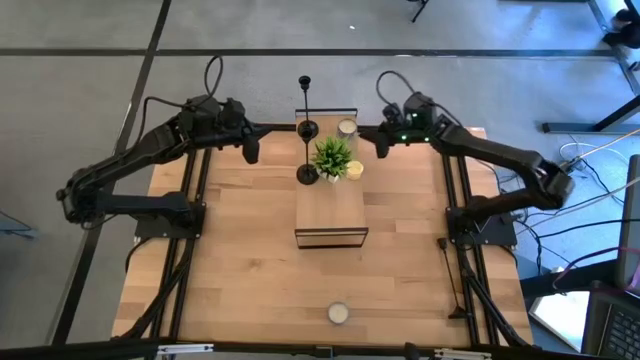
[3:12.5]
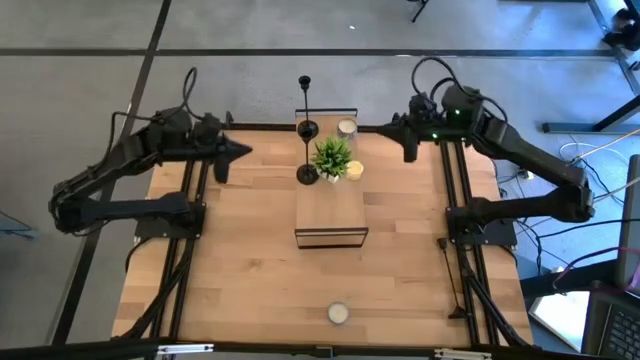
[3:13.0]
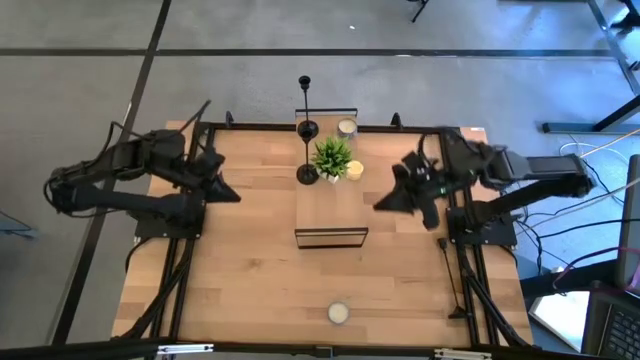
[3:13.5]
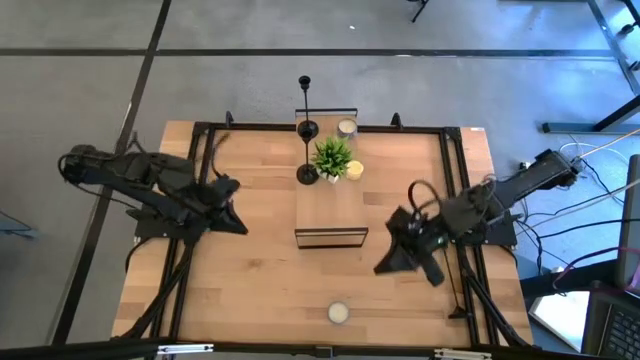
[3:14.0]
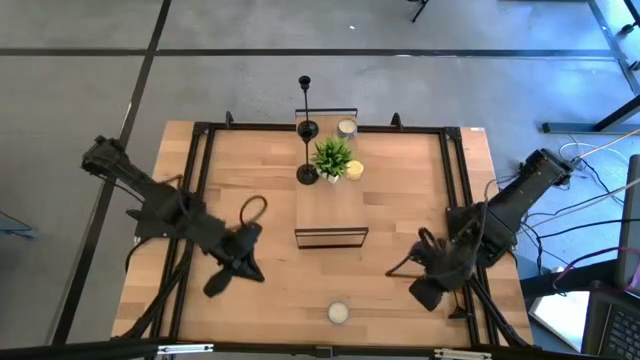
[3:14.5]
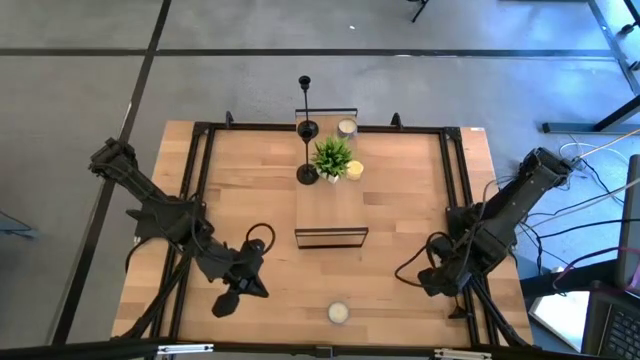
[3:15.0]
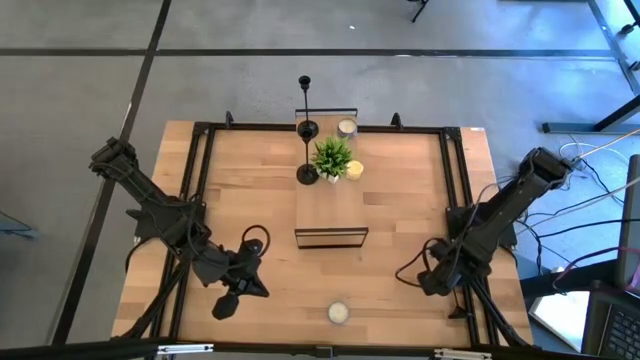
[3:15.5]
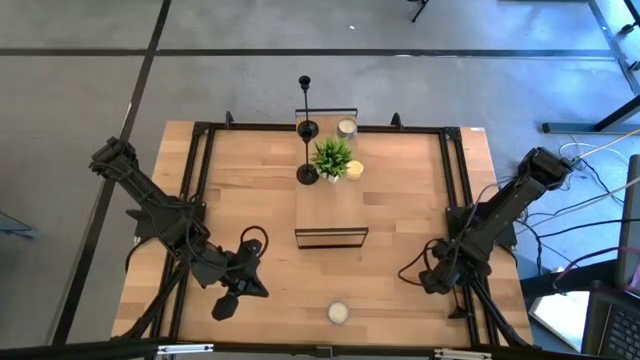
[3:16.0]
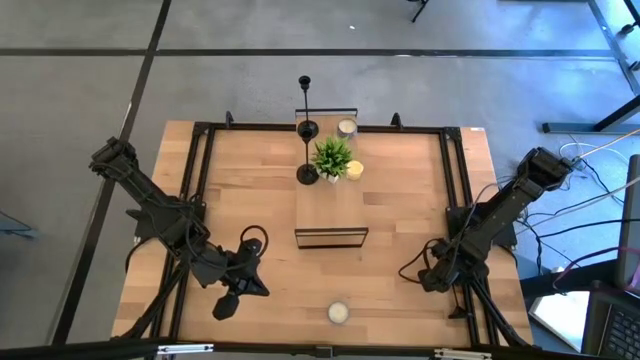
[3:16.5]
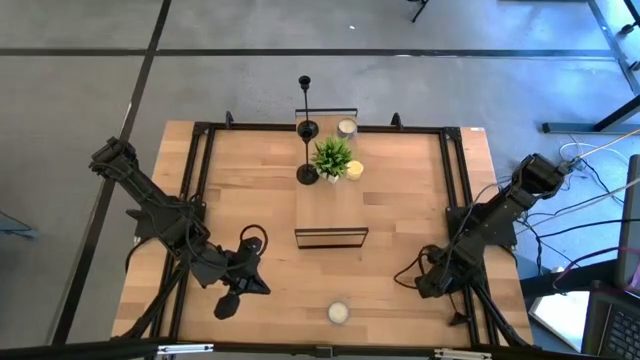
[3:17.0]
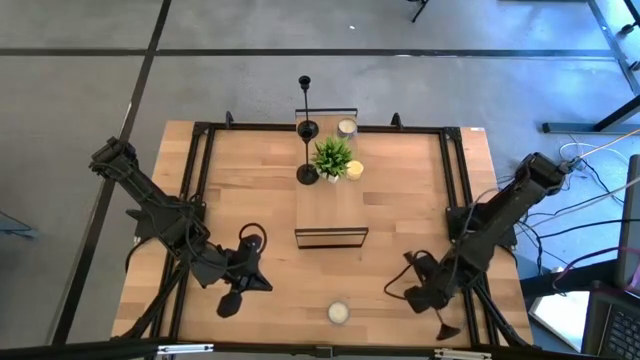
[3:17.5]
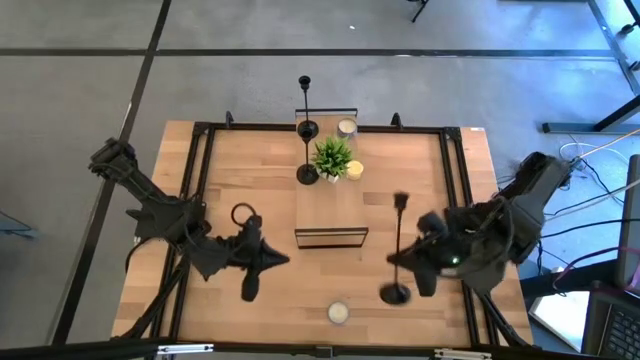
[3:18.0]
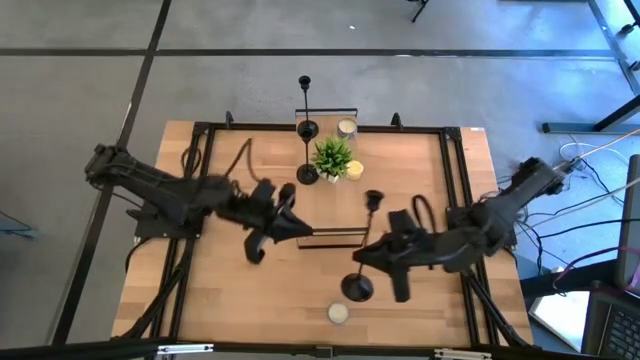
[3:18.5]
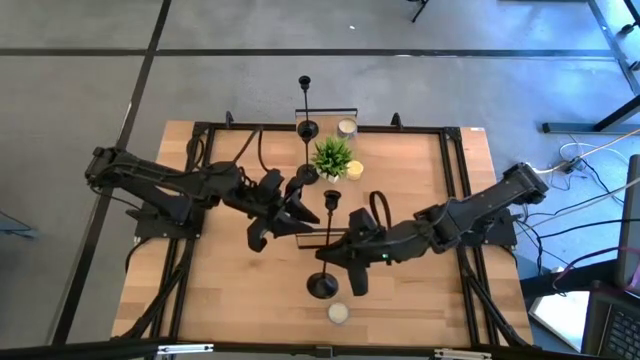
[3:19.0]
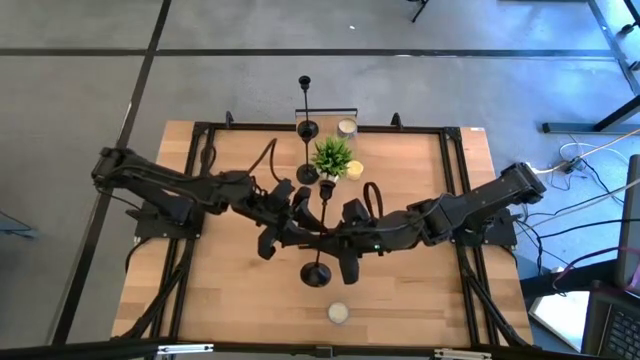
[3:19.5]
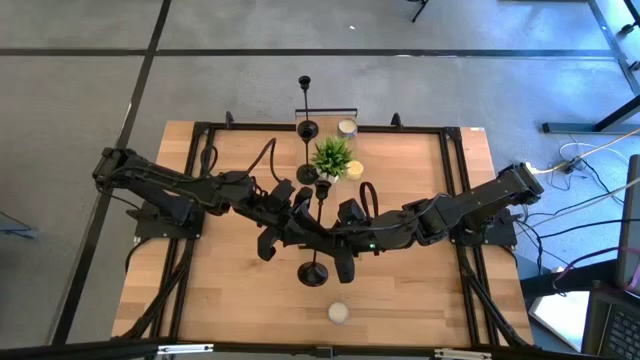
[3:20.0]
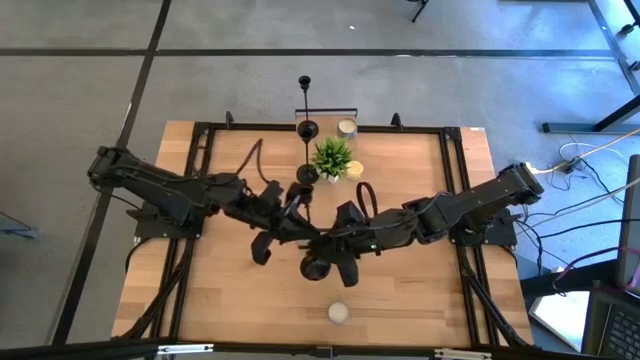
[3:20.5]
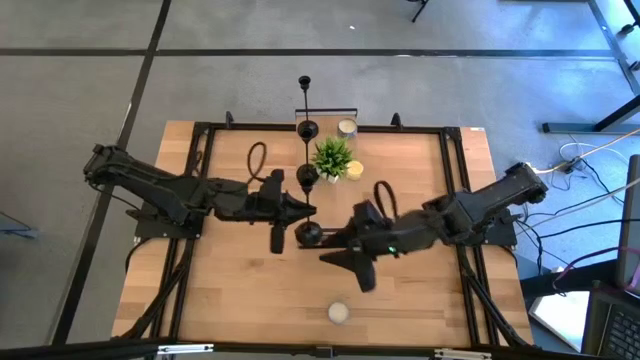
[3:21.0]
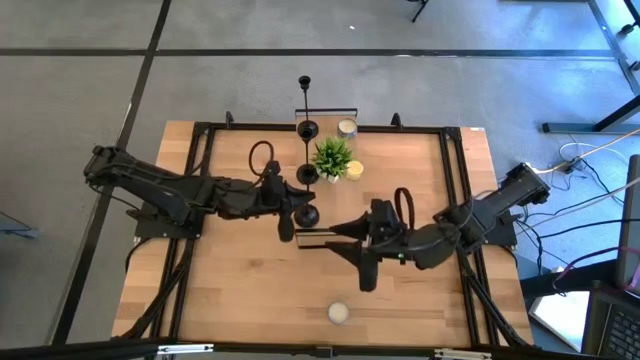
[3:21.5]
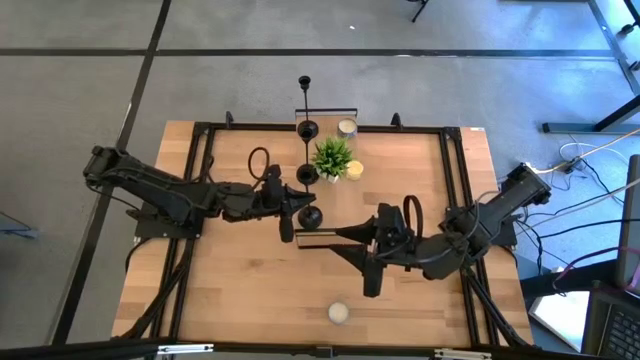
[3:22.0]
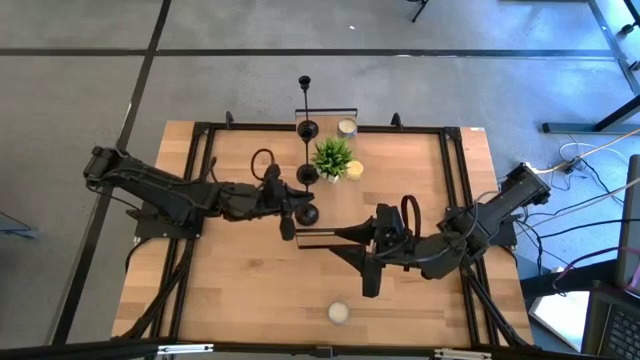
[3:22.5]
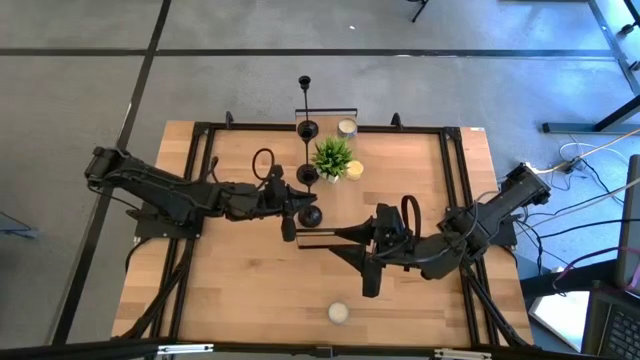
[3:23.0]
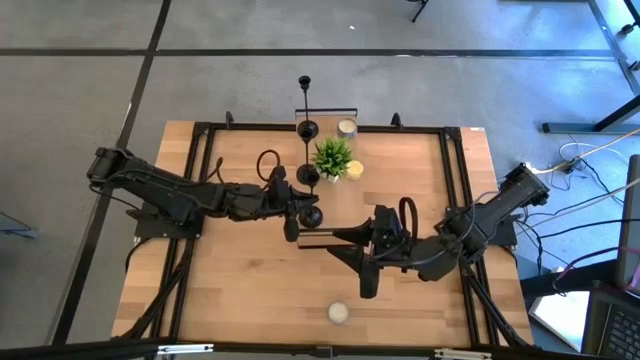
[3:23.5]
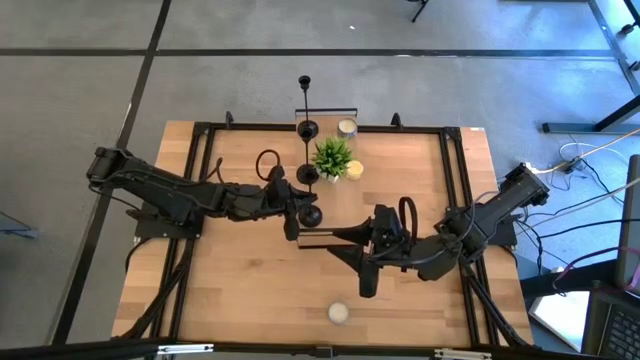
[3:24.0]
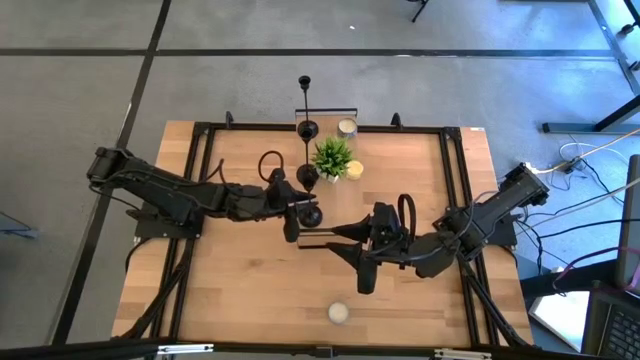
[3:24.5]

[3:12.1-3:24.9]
Task: Pick & Place candle stick holders
Put the candle holder on the shelf

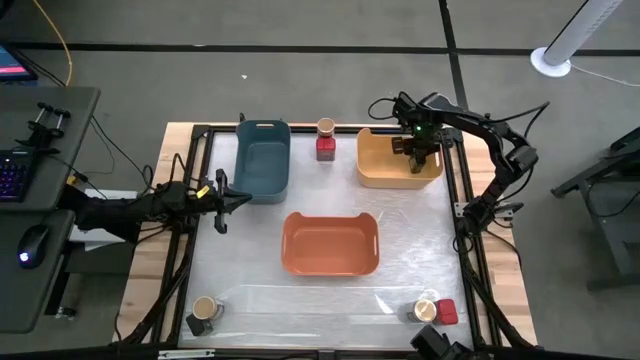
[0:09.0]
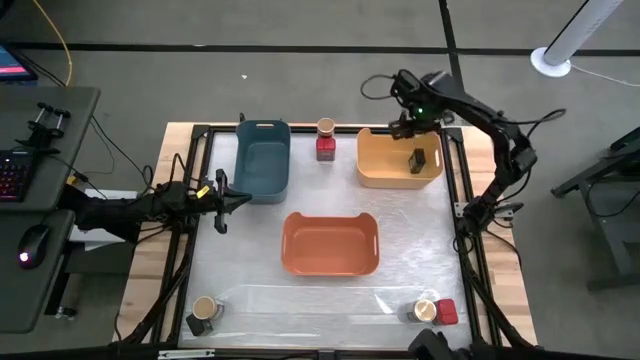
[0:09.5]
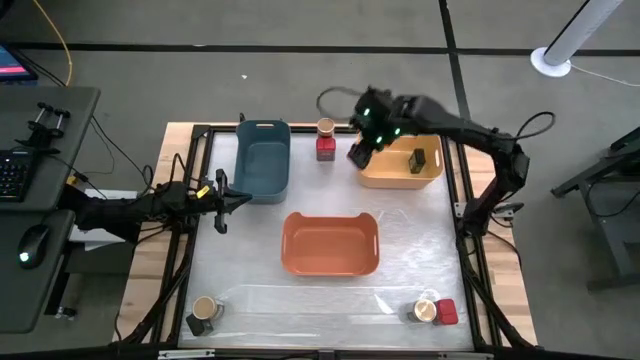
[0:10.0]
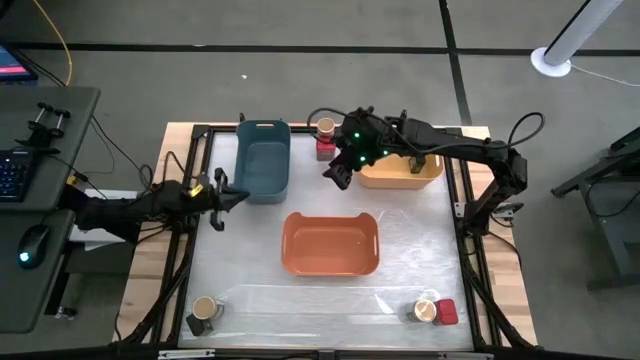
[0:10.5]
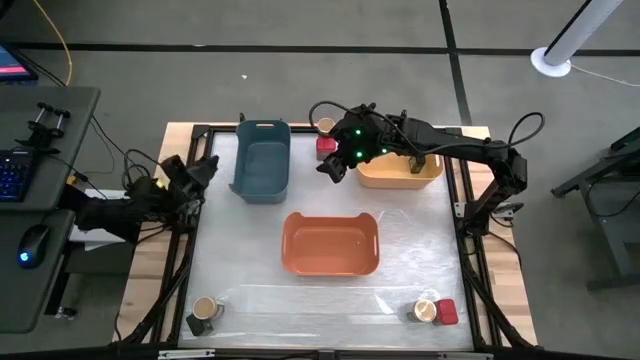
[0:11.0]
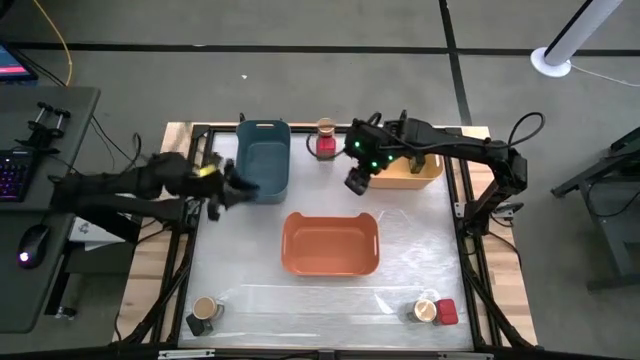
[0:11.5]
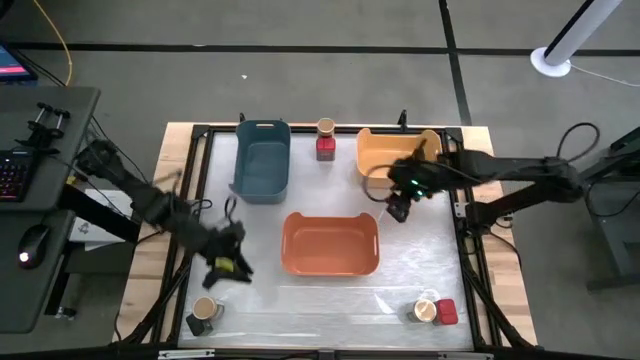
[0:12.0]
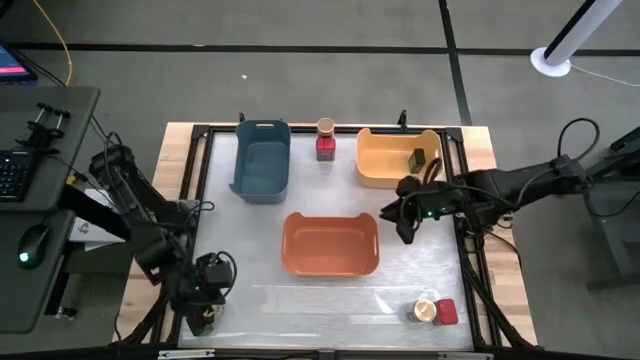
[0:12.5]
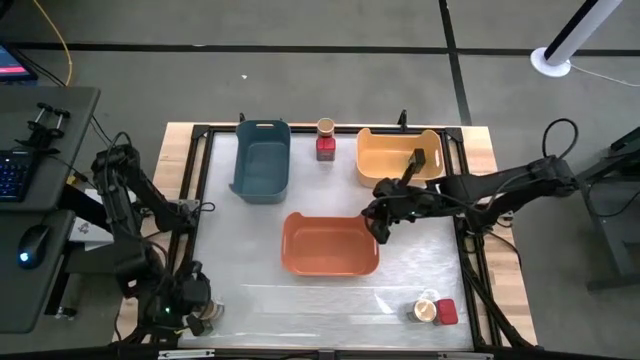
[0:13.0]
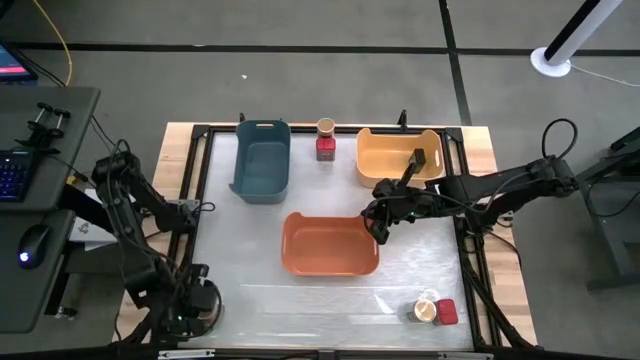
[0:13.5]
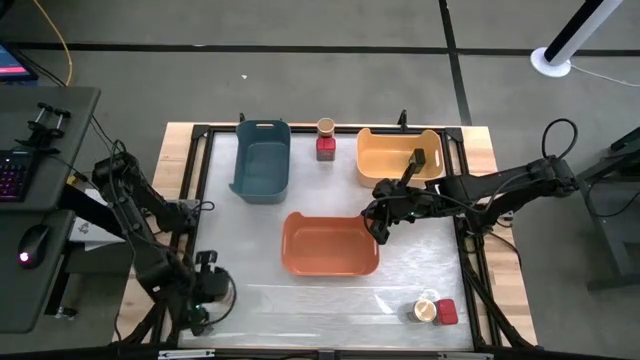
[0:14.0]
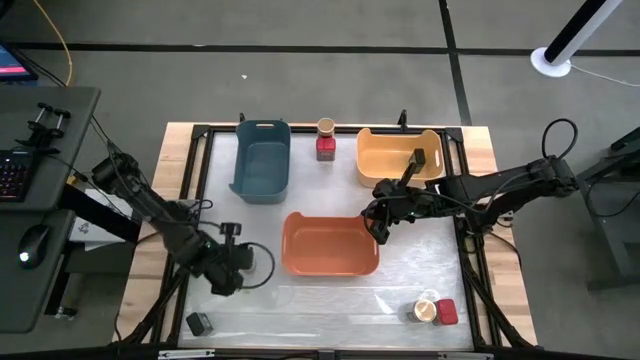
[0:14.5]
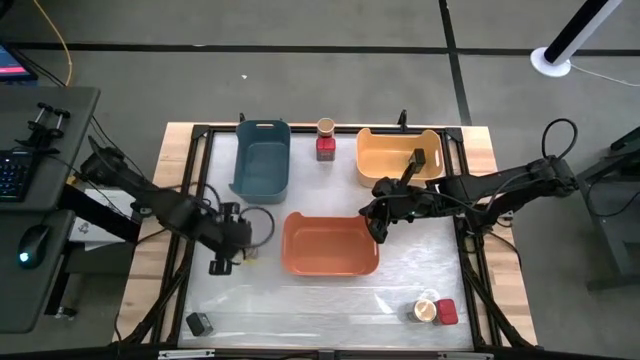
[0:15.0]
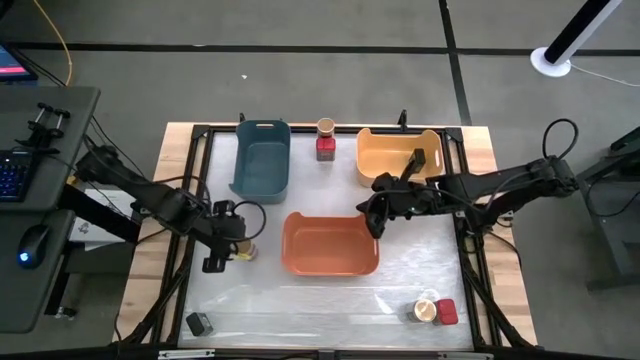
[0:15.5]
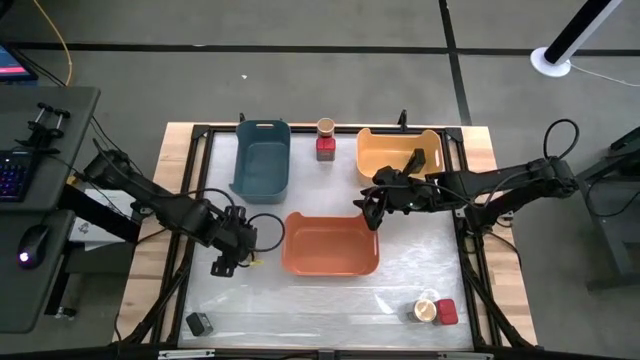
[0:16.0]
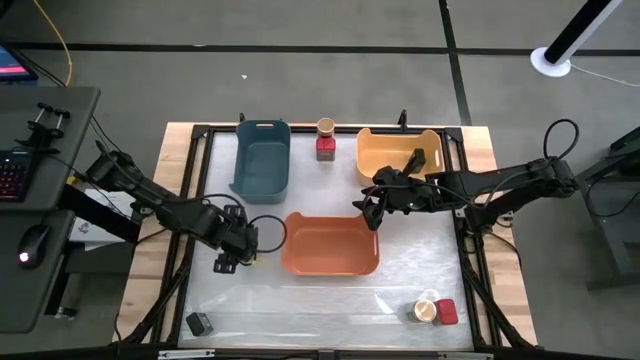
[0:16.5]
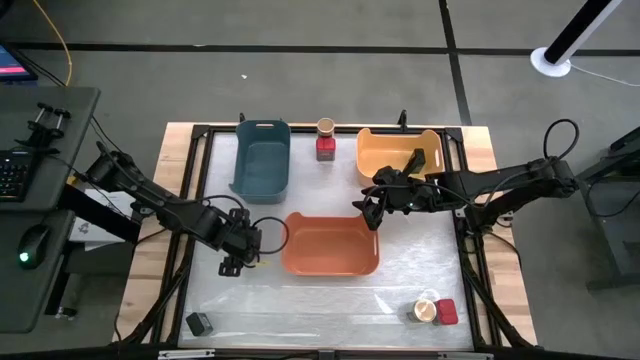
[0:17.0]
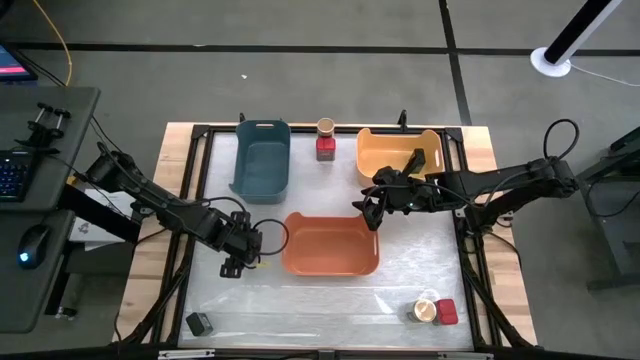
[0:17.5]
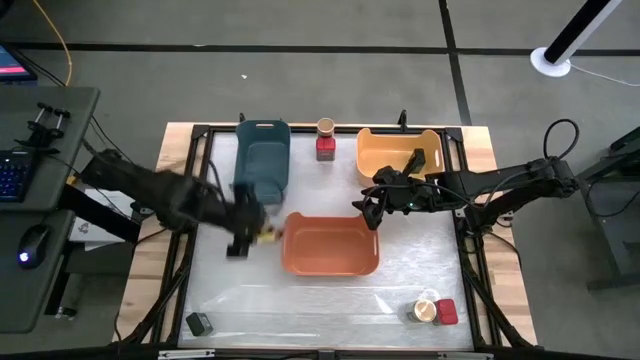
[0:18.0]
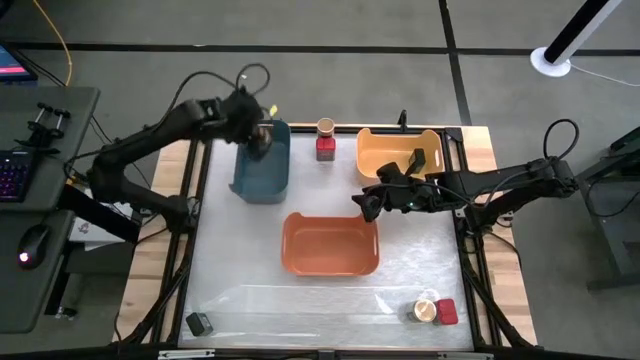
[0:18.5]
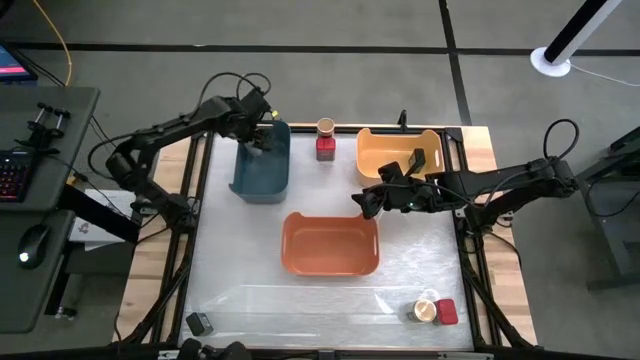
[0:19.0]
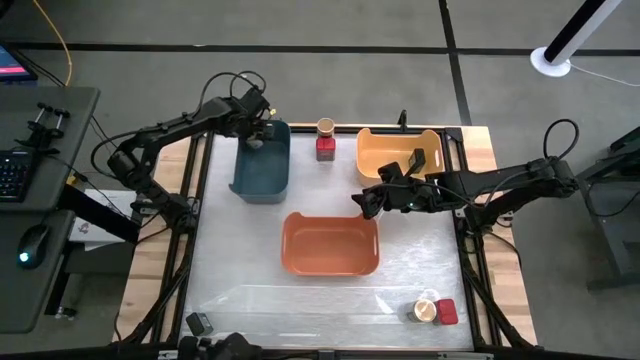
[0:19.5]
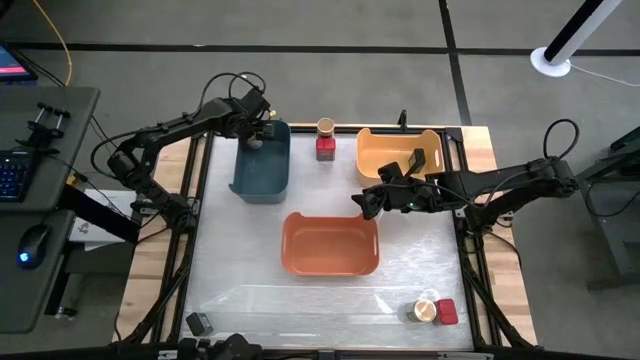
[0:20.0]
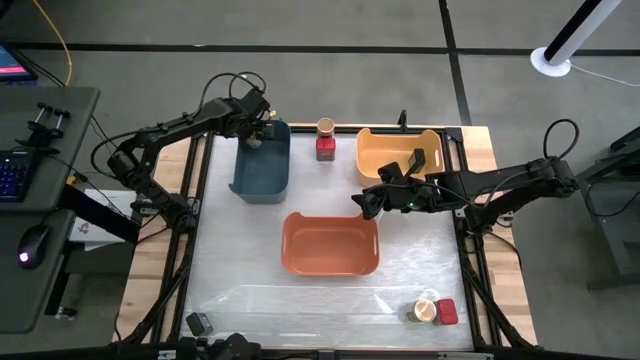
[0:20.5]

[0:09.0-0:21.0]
Task: Sort spices by type
Put the bottom left gold seasoning bottle into the blue bin
